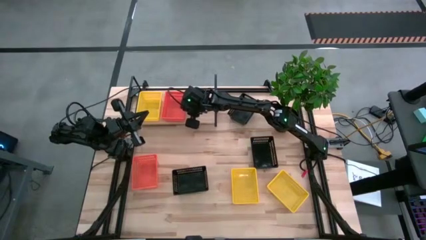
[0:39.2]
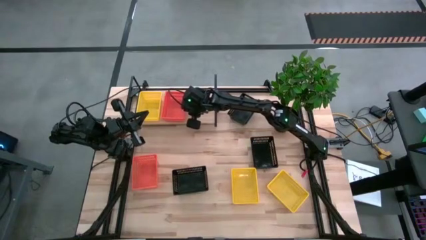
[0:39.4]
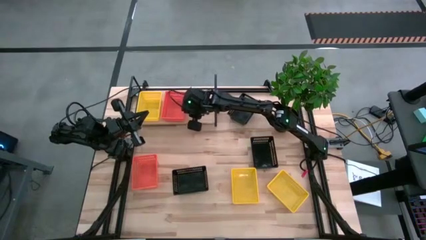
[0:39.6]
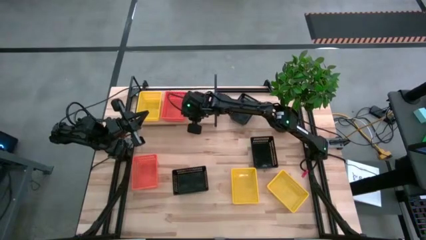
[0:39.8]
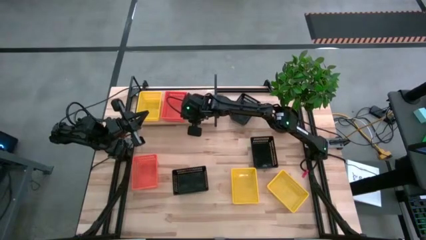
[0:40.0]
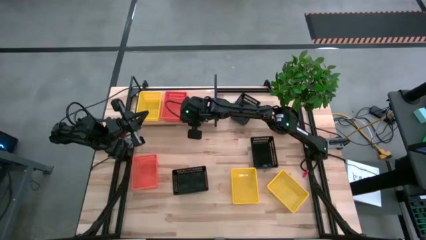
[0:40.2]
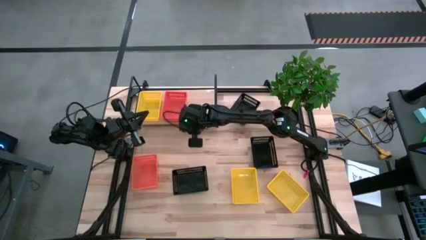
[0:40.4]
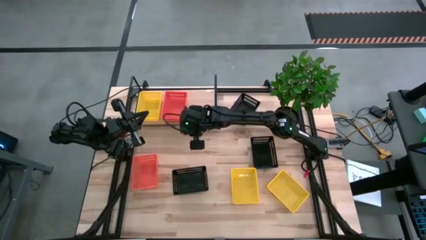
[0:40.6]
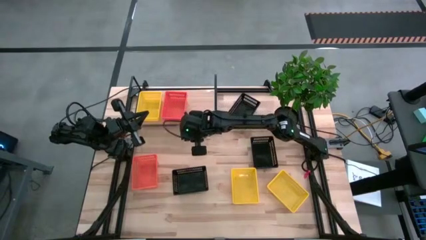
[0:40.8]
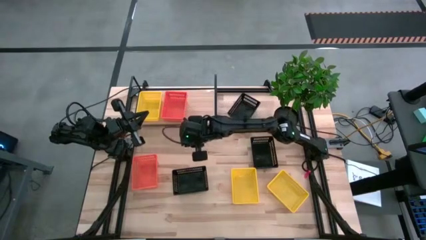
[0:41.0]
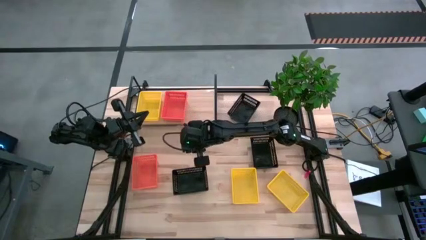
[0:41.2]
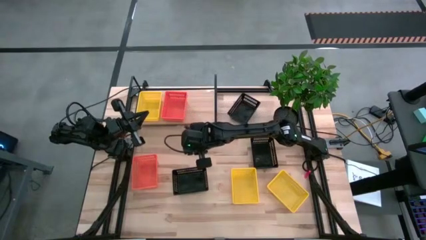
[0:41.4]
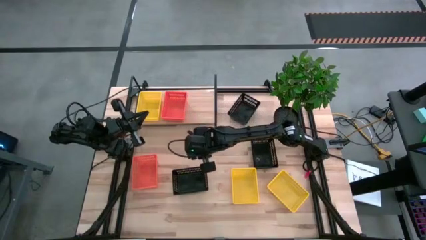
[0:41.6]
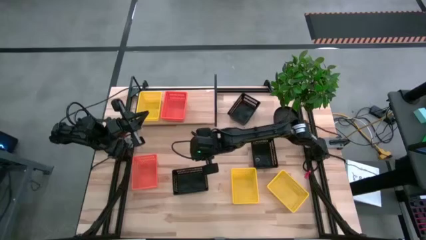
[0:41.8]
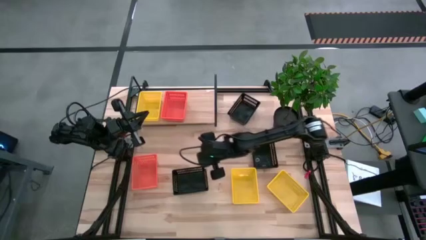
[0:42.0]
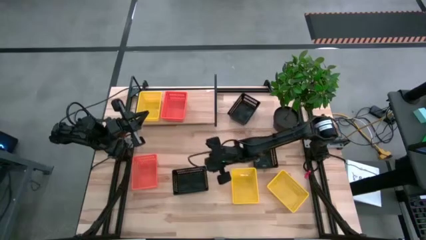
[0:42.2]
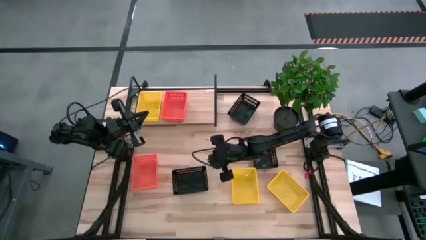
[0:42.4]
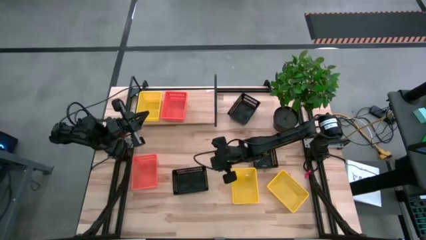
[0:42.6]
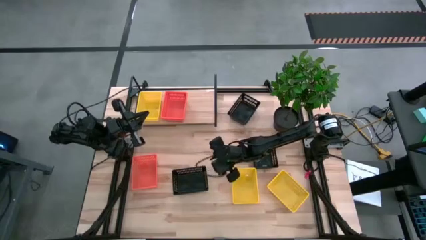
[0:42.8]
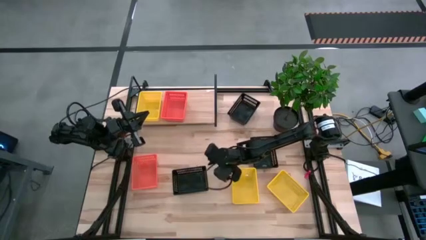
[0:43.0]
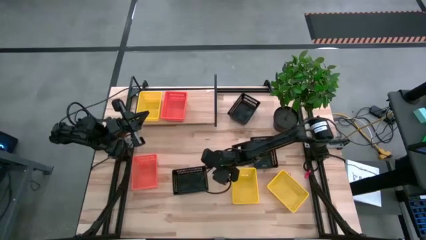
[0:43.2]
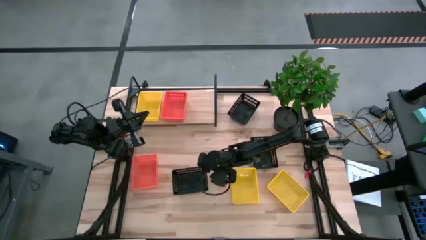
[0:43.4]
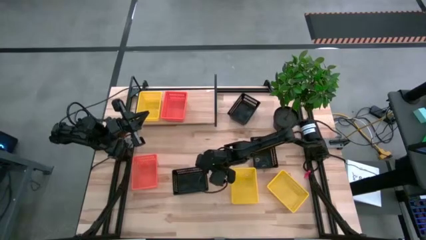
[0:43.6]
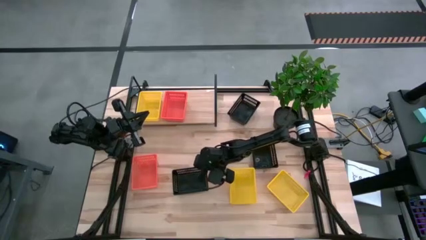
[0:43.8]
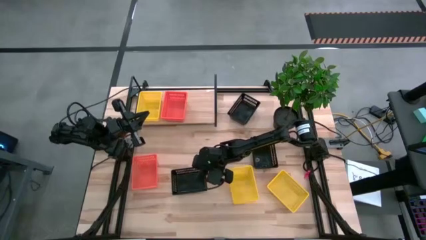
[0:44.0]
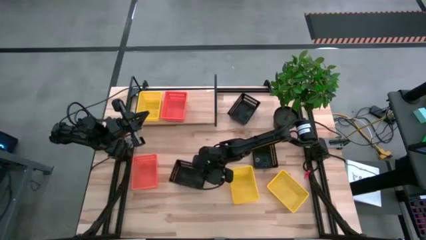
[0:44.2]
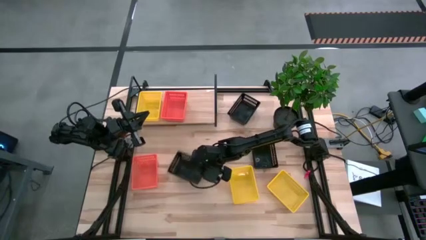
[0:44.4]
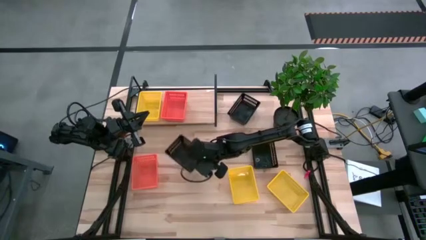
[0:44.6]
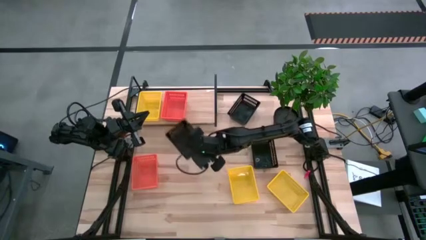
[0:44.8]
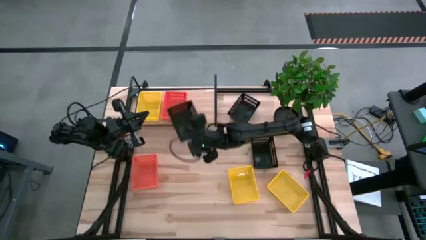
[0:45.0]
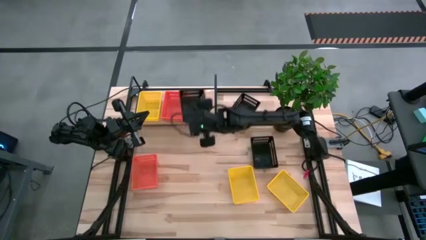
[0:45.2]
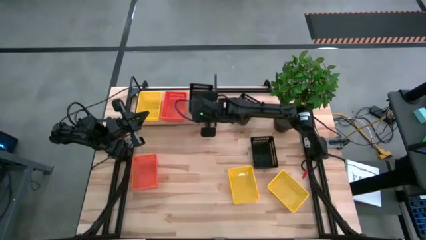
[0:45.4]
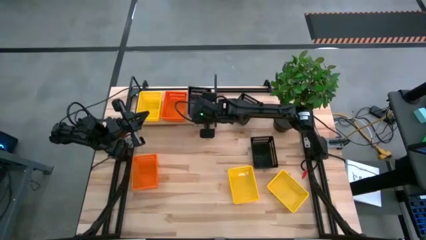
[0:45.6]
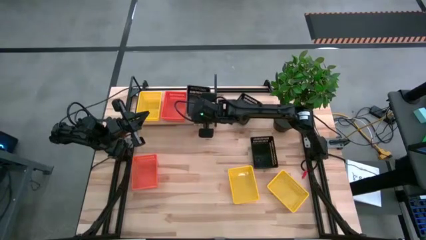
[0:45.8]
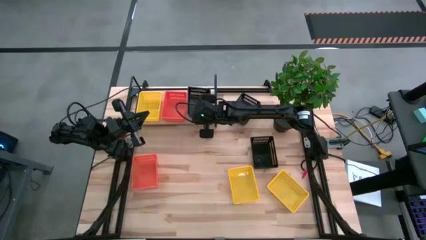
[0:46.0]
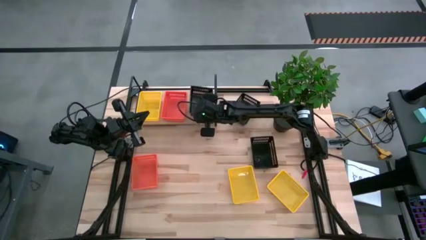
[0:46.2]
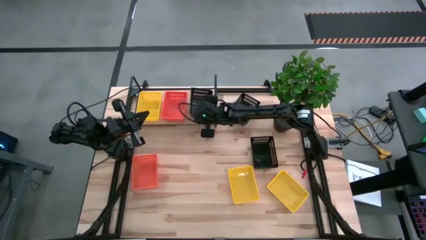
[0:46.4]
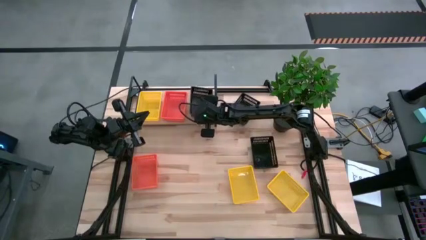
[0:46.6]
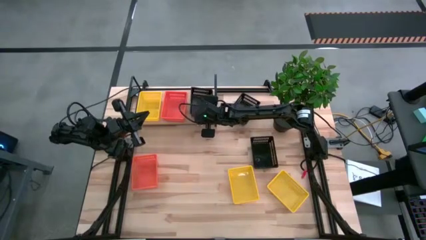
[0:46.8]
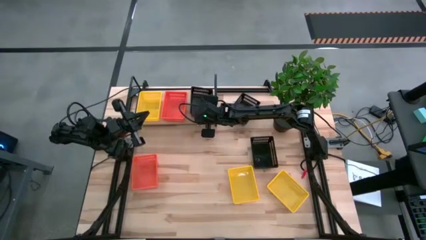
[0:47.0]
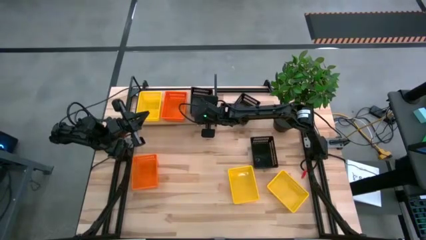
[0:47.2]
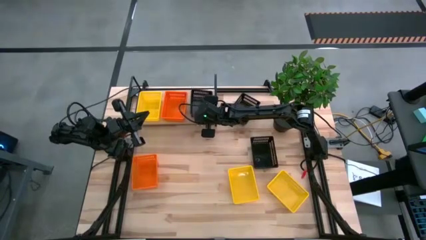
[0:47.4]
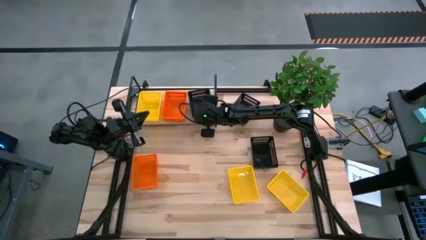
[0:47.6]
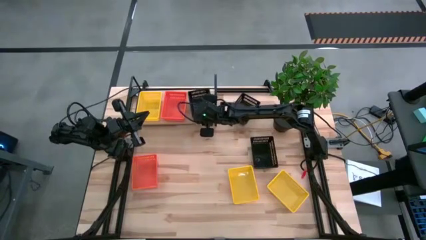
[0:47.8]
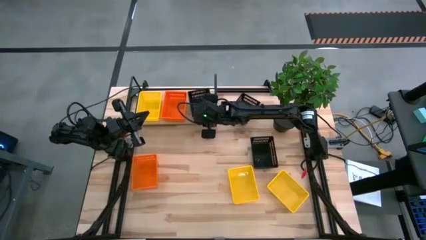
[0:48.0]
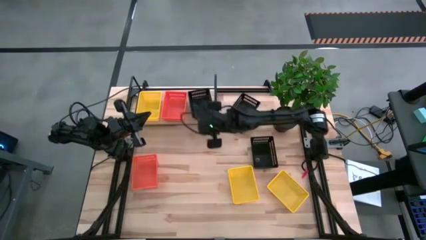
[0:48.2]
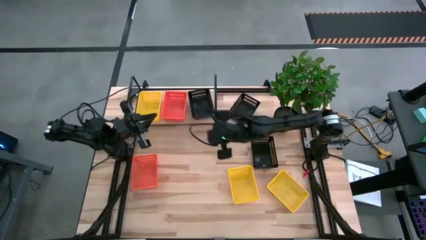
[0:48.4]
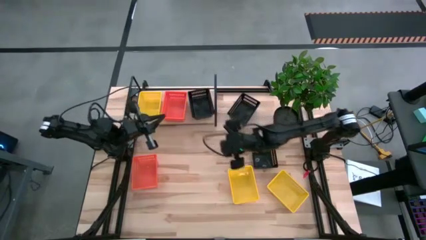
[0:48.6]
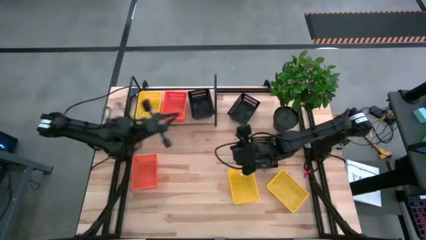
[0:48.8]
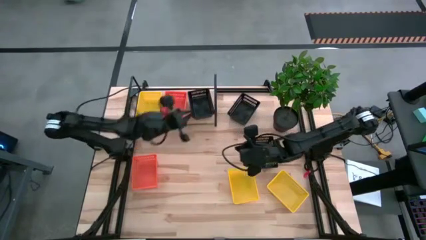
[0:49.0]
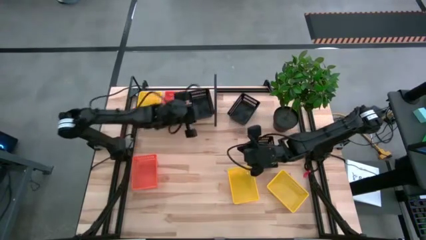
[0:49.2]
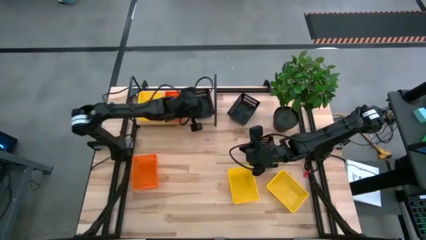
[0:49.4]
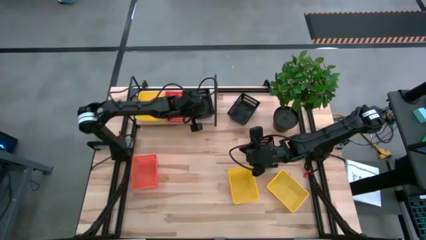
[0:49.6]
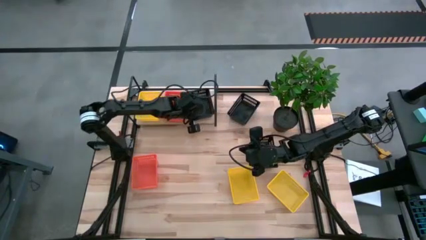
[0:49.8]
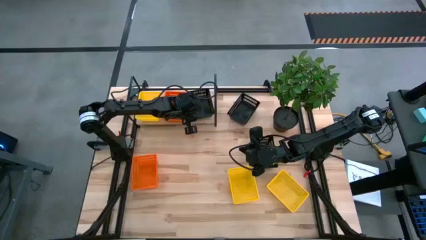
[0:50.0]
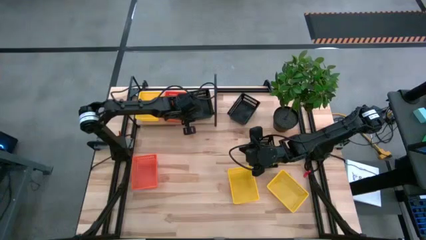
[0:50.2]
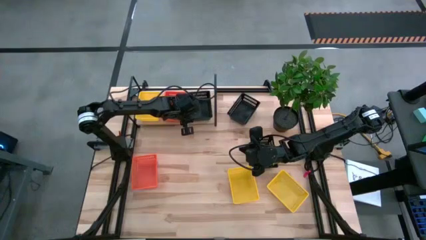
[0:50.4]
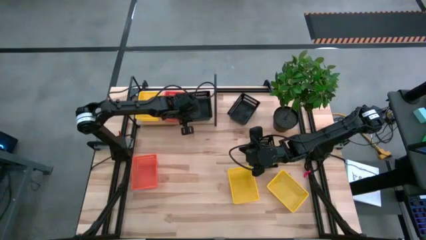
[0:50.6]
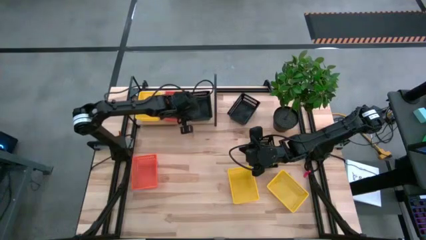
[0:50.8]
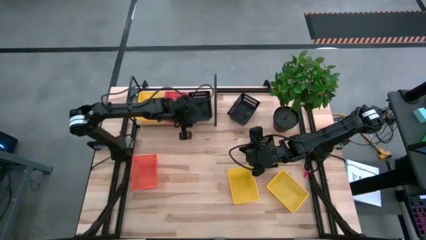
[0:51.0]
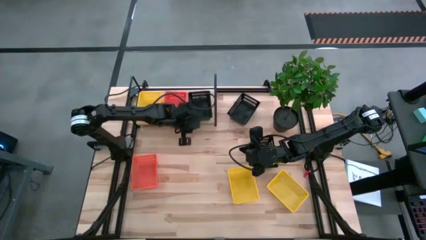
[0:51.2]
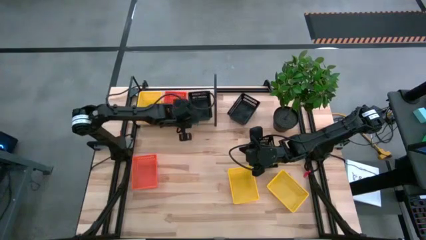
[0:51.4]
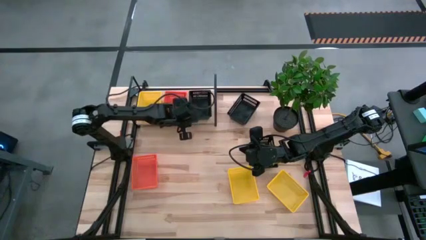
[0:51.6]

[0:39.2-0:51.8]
Task: Stack baskets on shelf by color
Put the bottom left black bin on the shelf

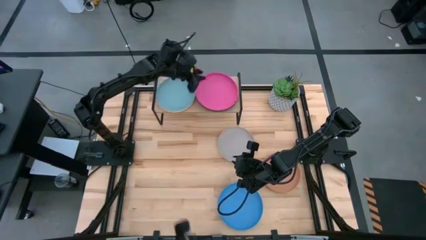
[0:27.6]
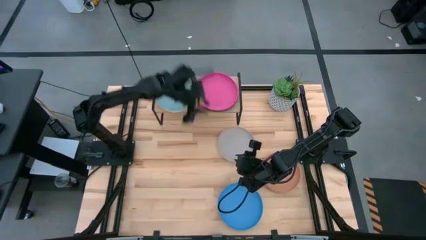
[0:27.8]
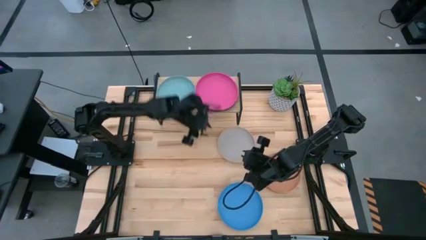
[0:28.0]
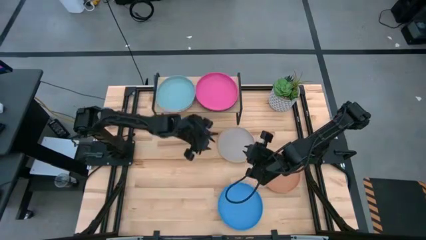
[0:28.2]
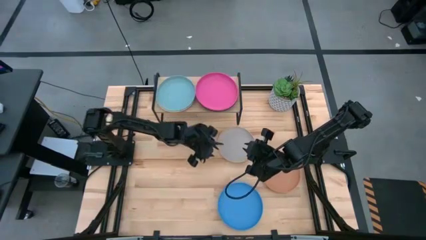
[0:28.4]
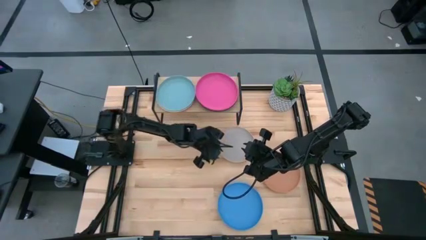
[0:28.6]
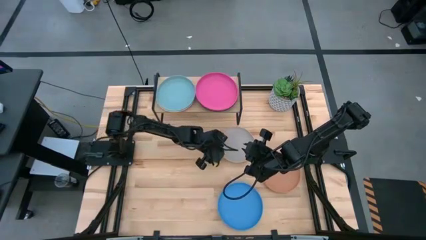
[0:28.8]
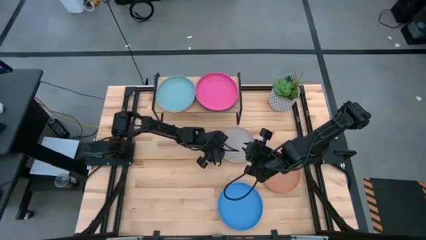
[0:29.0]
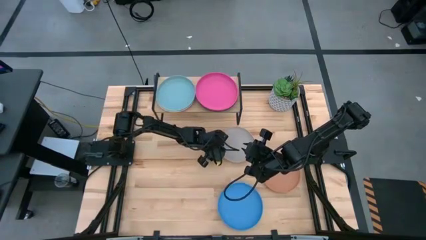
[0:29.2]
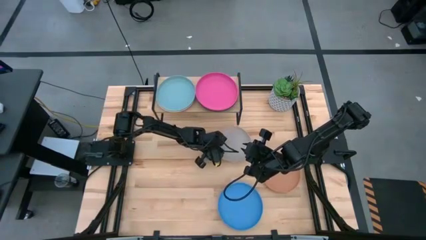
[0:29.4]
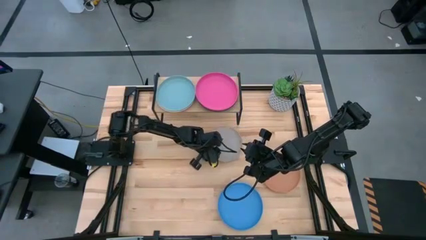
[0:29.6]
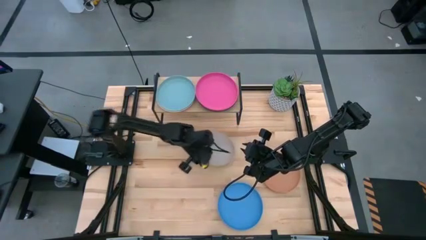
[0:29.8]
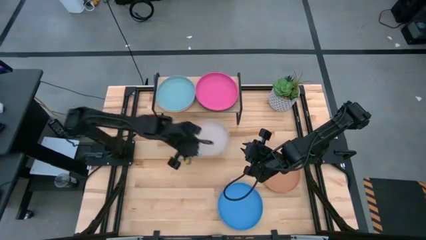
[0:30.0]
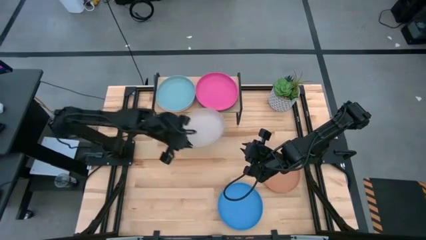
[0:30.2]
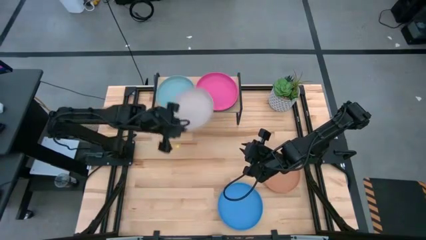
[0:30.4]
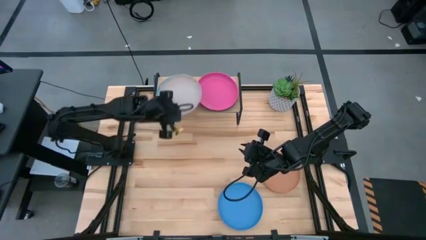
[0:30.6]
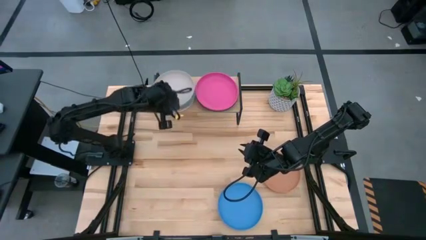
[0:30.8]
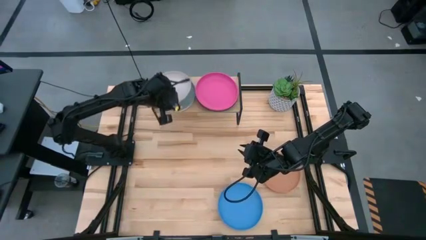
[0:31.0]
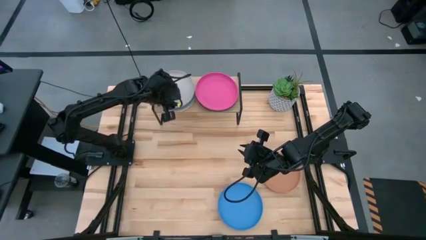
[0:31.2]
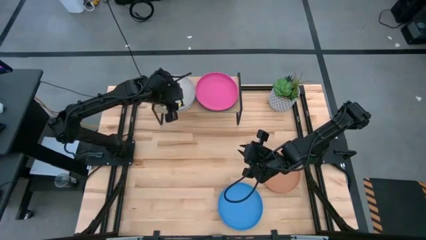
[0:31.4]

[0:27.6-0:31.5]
Task: Place and stack plates onto a shelf
Stack the gray plate on top of the light blue plate on the shelf
